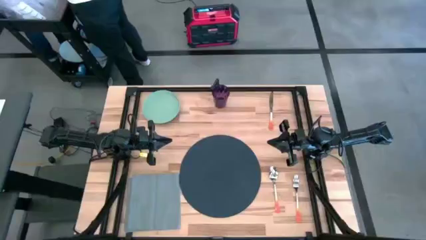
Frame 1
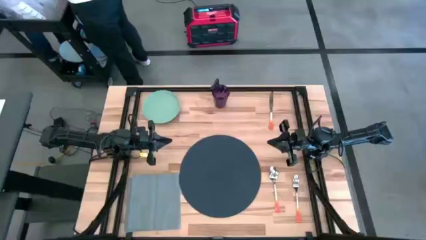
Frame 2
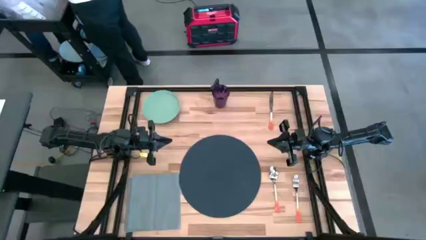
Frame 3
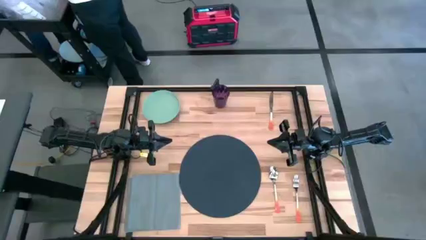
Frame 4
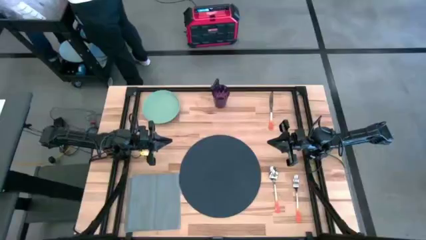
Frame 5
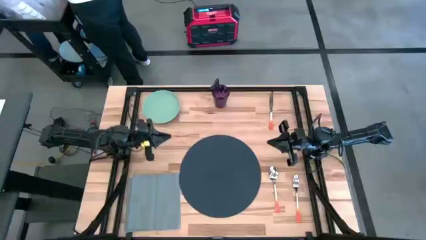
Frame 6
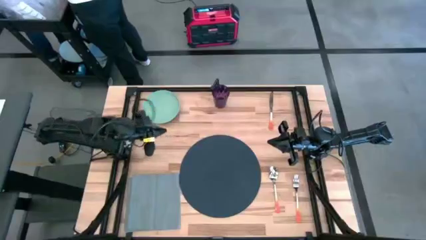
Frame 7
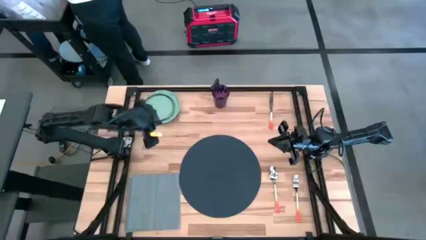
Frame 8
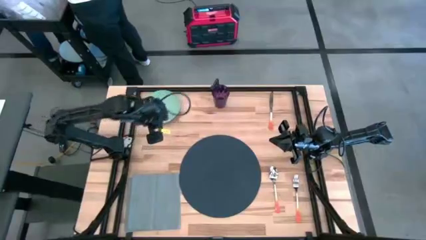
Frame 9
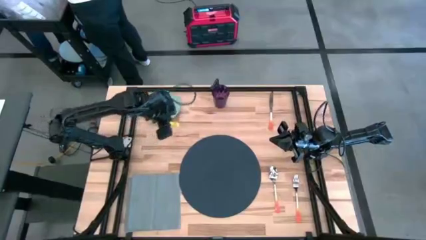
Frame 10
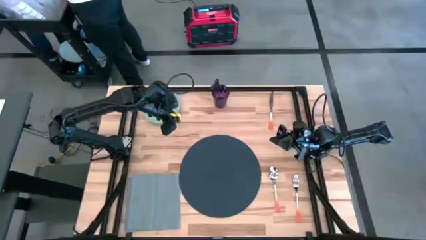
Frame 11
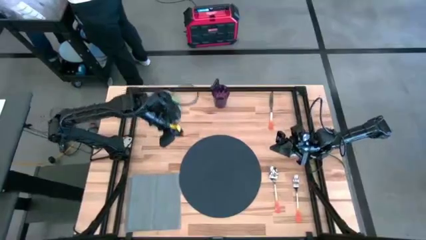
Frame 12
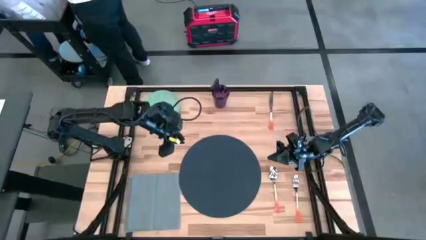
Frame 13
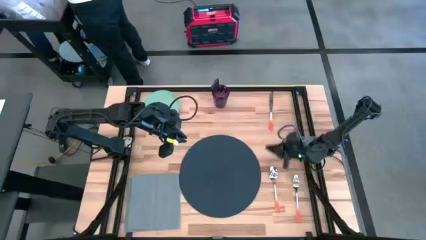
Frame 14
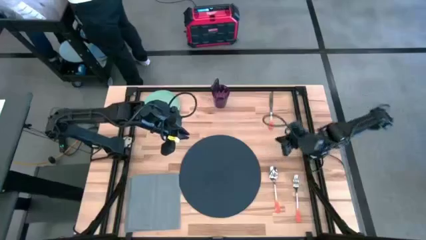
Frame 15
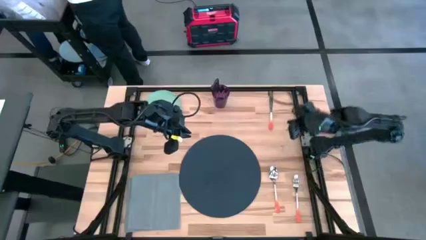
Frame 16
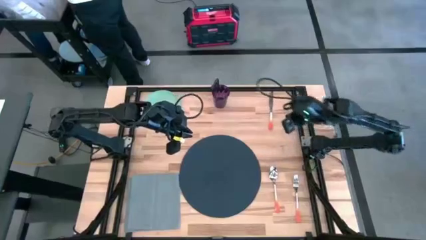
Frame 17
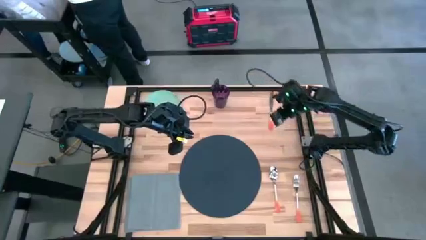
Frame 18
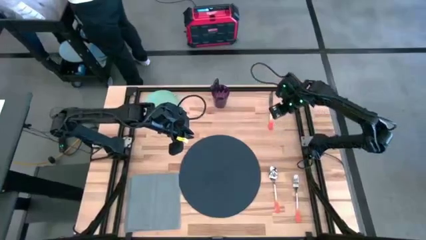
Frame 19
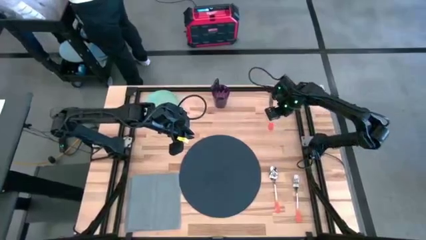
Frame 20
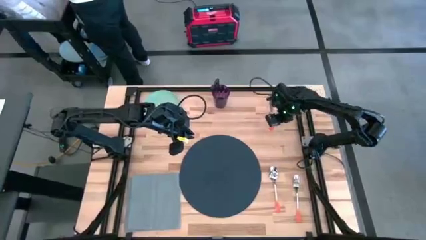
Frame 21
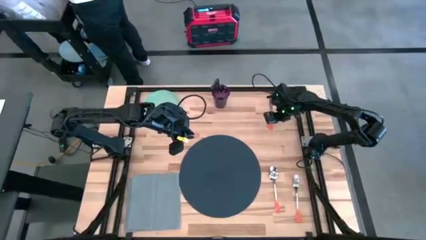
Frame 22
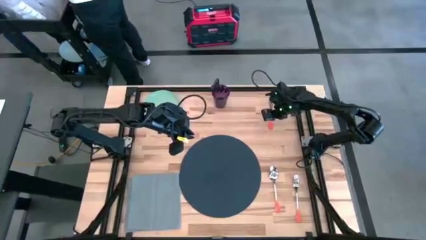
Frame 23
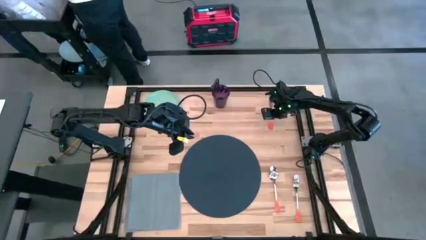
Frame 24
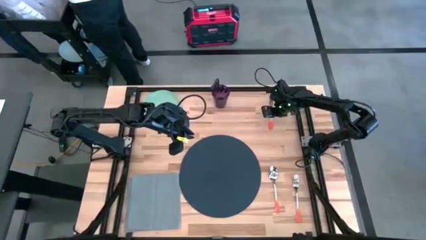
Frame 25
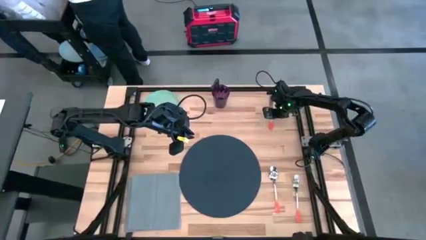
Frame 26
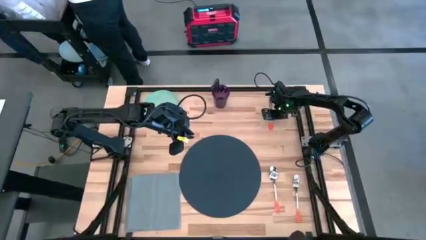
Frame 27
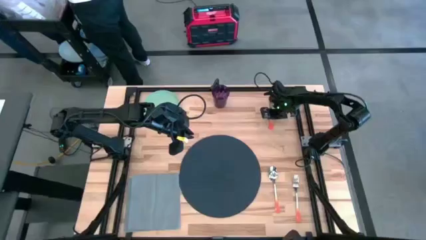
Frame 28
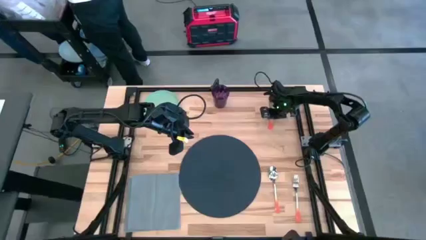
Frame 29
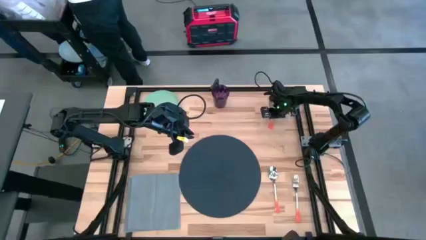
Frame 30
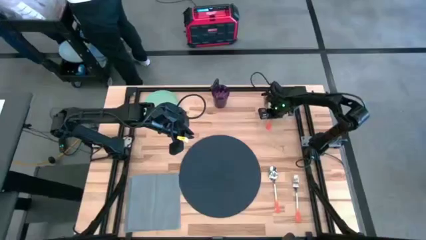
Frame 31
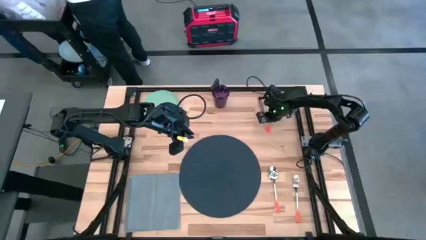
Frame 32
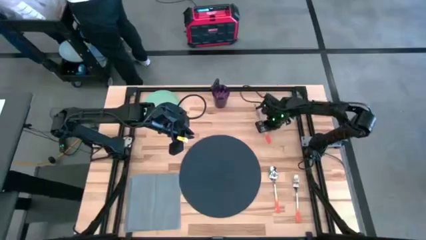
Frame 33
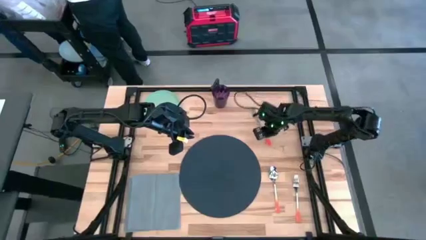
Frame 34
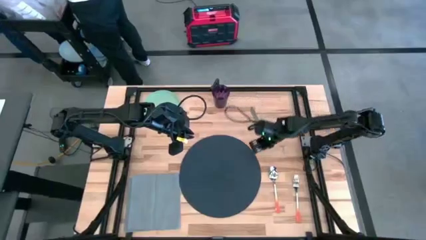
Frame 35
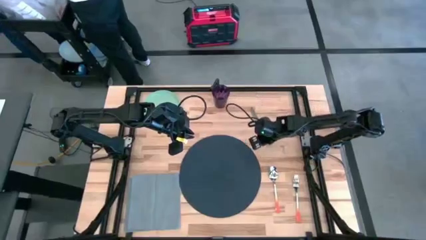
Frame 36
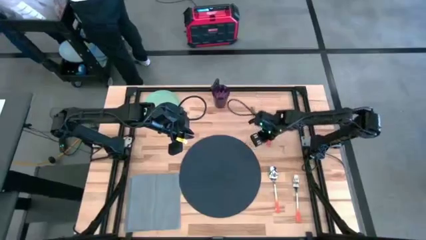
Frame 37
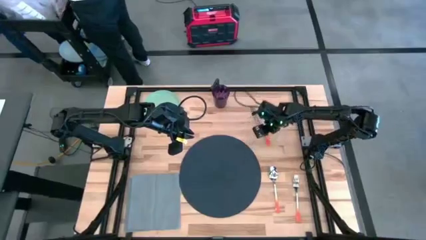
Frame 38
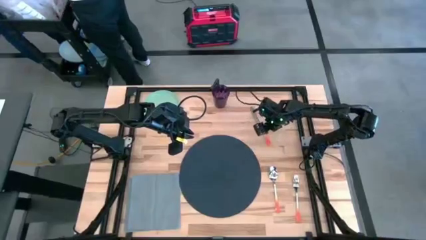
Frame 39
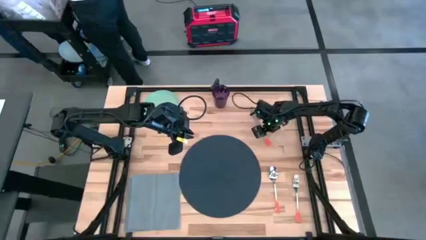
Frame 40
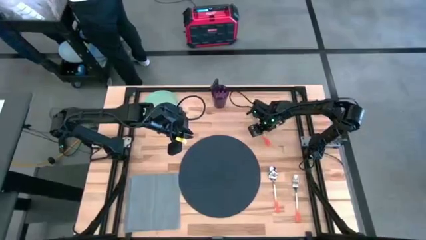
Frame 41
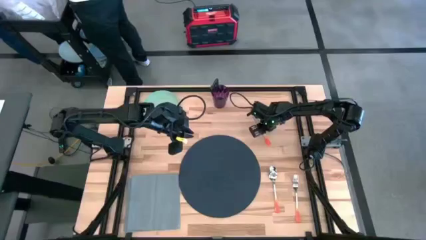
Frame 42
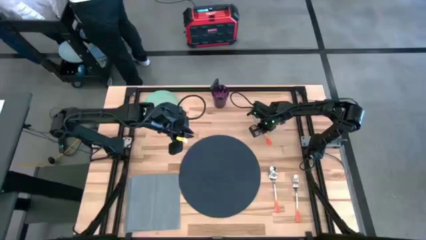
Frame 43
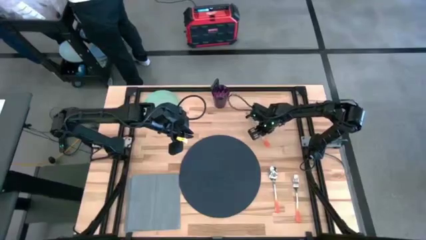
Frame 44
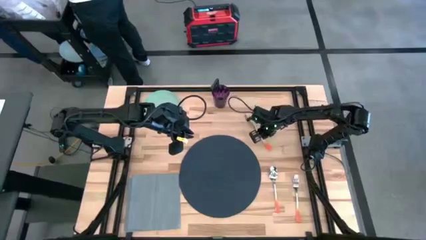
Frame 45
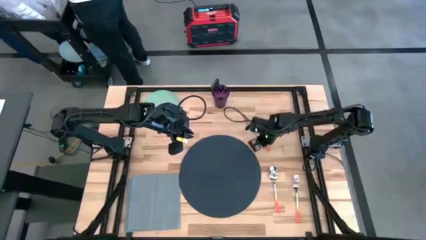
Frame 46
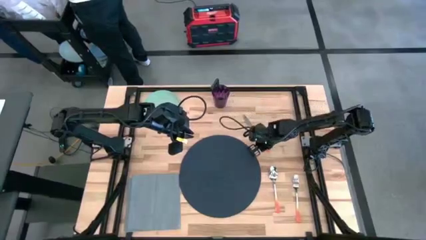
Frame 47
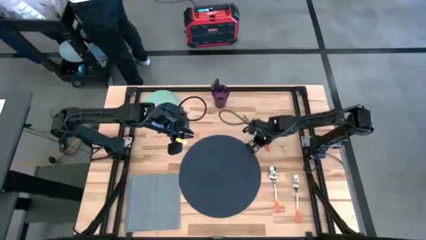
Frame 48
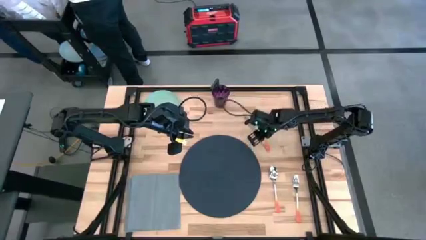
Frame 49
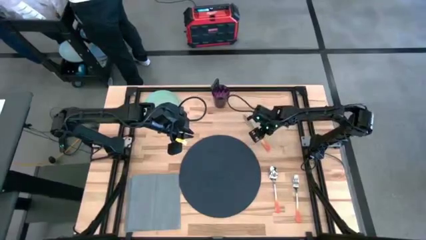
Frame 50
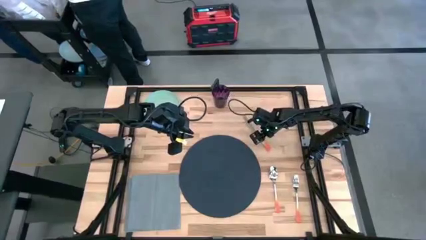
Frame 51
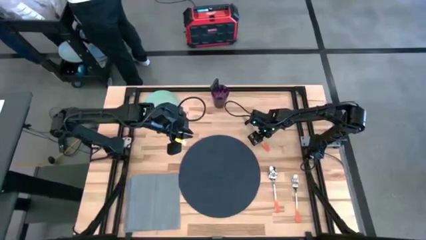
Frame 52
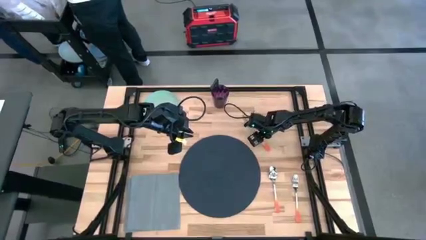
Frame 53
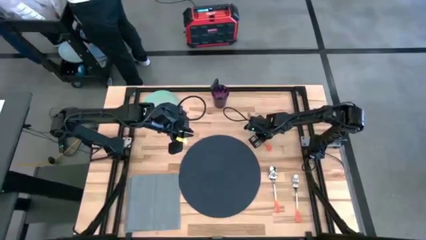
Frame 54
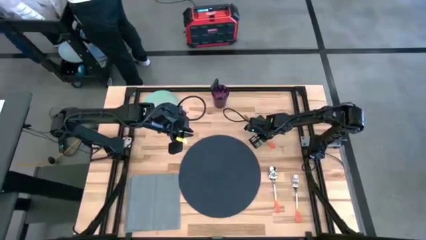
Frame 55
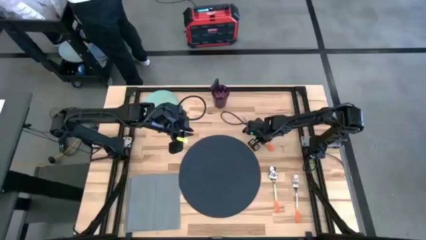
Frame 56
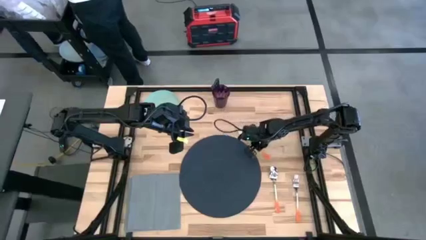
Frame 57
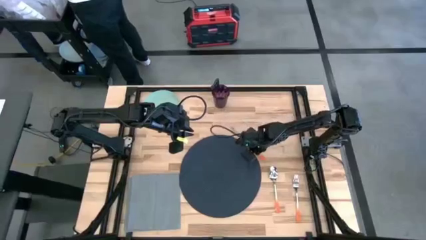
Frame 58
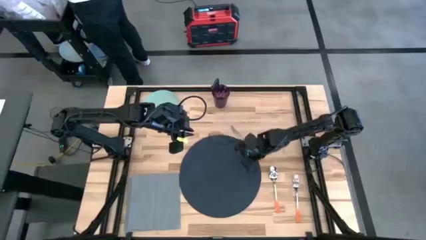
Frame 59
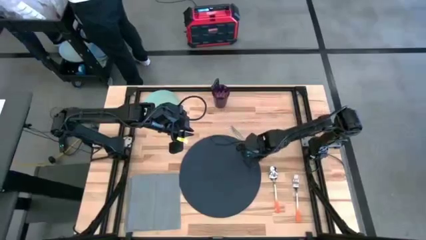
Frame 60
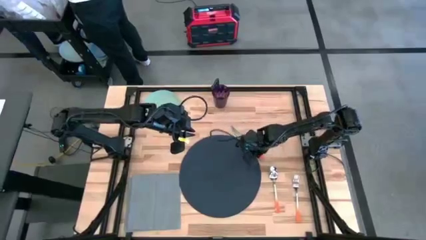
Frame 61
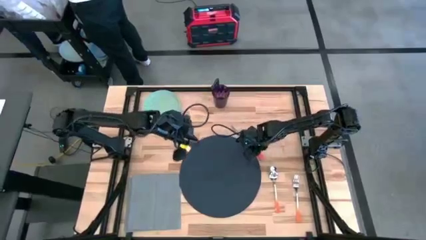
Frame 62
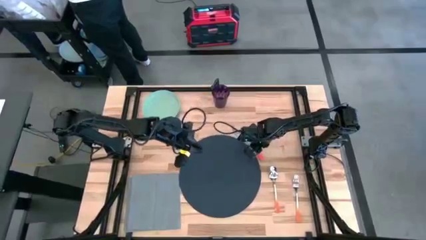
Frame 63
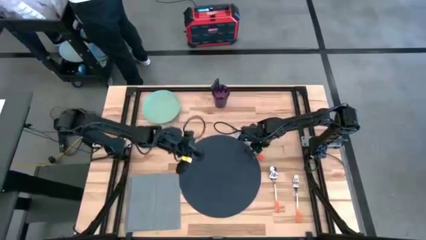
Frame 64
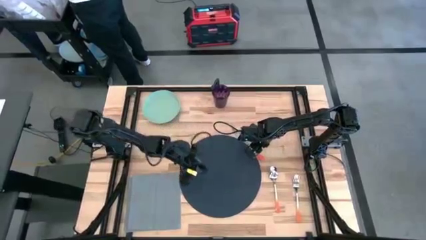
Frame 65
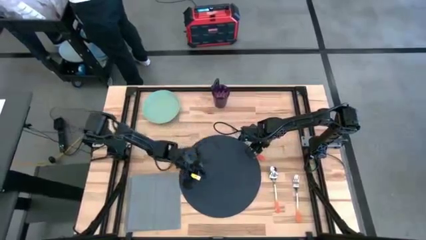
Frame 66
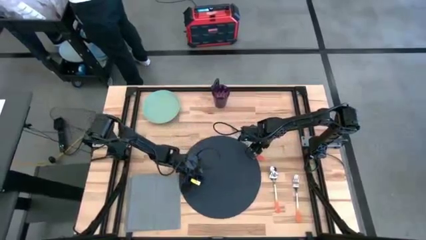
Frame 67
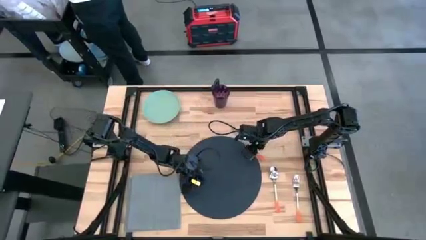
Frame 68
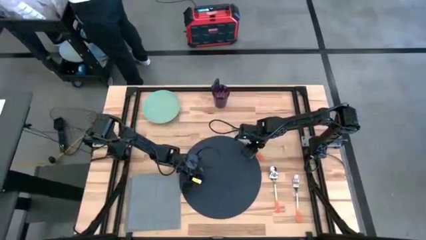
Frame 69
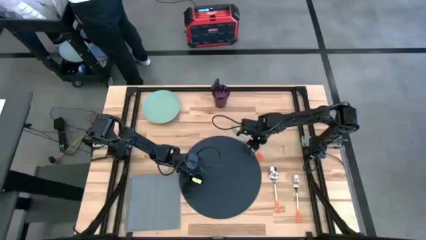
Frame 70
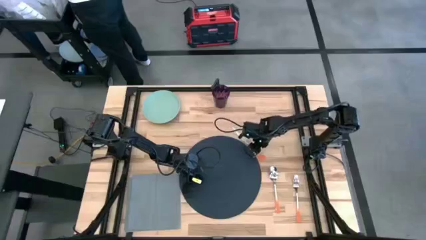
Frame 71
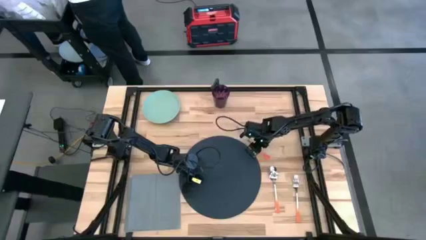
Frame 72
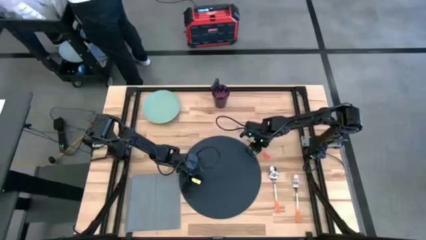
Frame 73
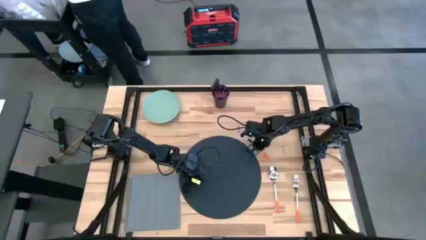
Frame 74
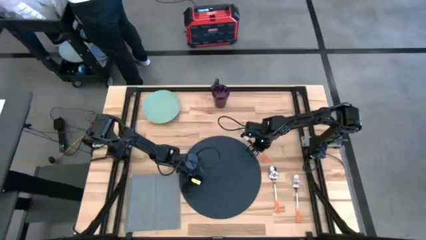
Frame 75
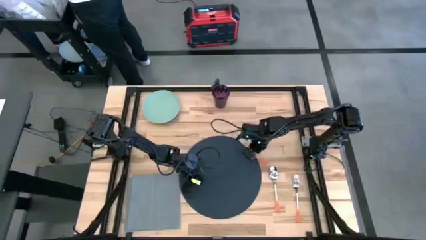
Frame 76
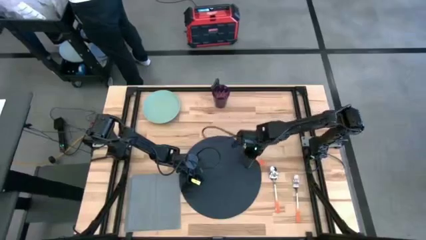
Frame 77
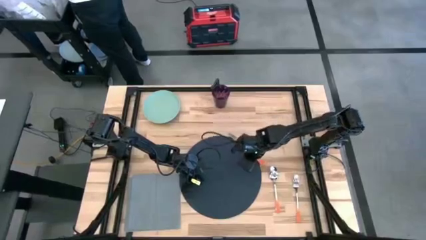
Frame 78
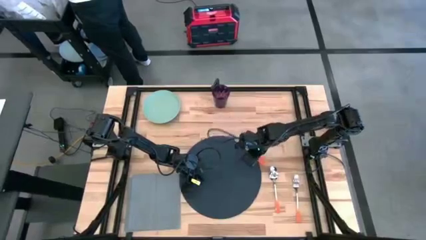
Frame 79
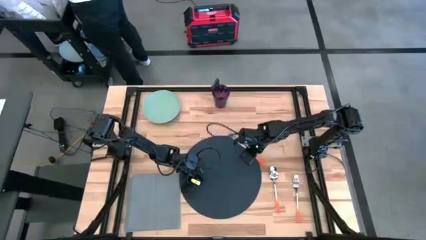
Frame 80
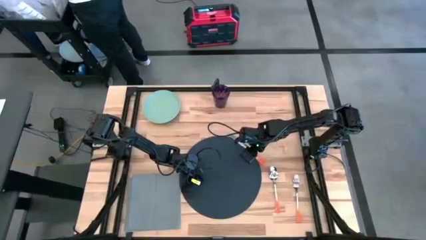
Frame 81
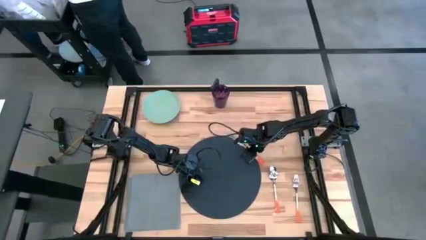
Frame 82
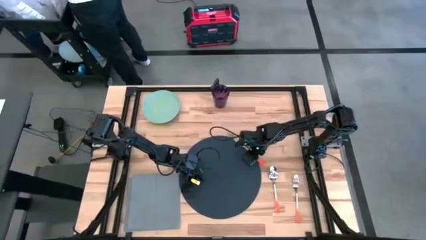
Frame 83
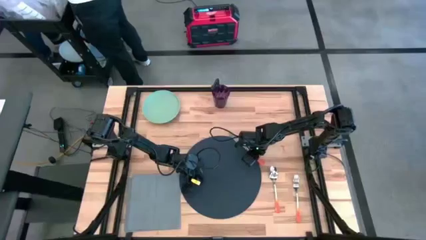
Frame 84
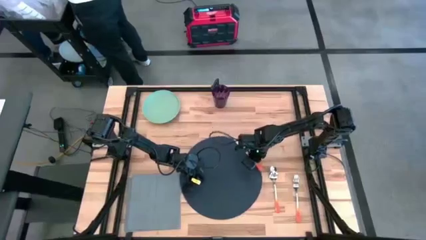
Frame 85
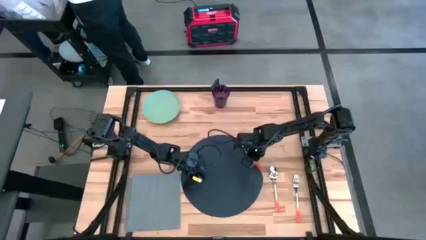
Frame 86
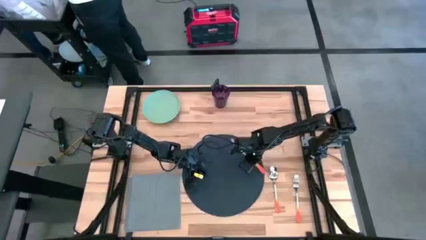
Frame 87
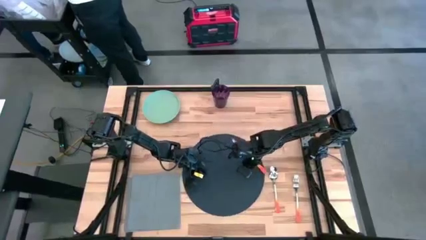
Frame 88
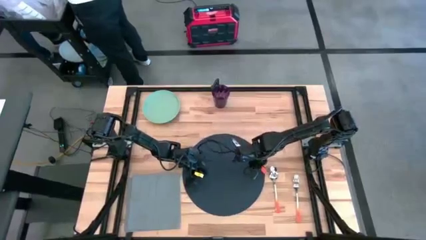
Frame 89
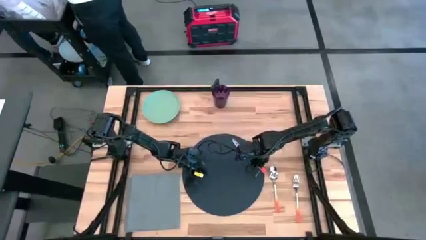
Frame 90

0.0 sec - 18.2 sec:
Task: Set table place
Move the table knife to the table mat
